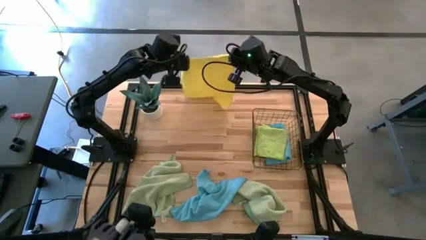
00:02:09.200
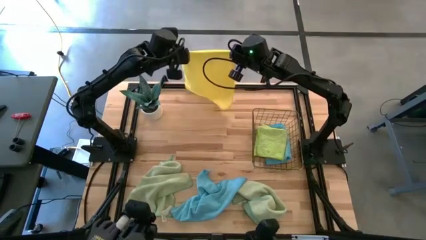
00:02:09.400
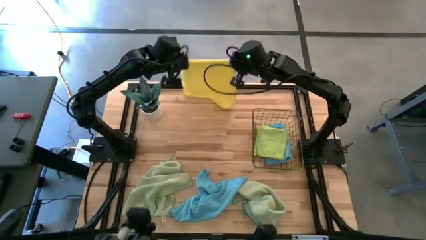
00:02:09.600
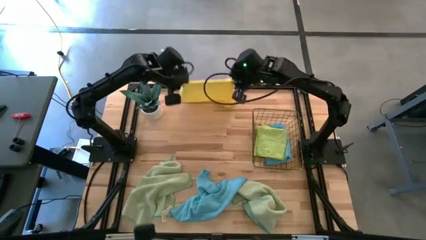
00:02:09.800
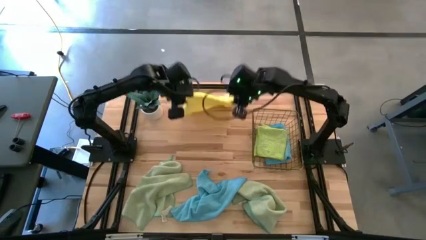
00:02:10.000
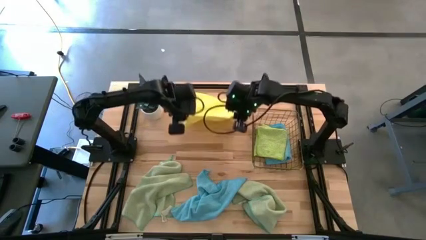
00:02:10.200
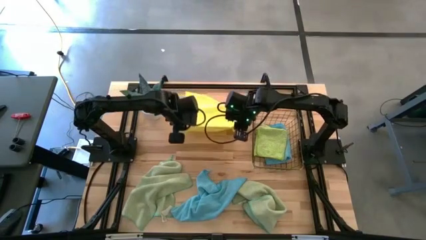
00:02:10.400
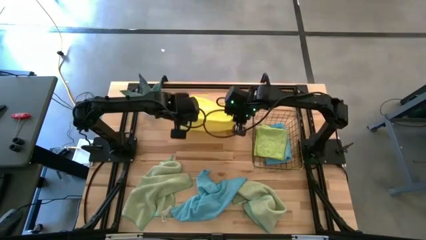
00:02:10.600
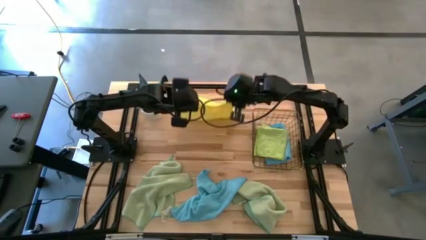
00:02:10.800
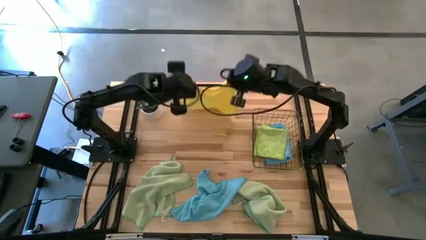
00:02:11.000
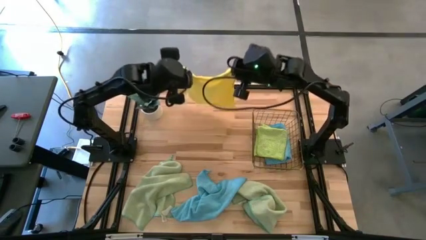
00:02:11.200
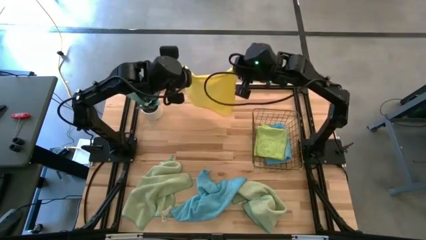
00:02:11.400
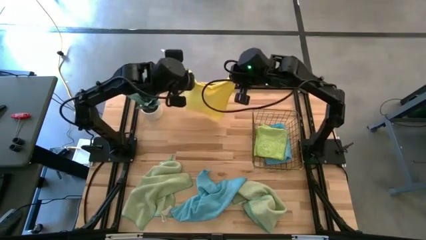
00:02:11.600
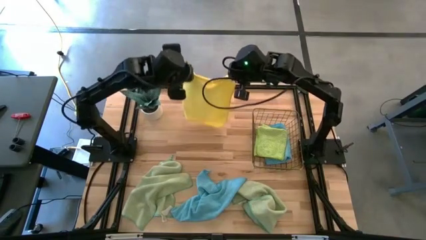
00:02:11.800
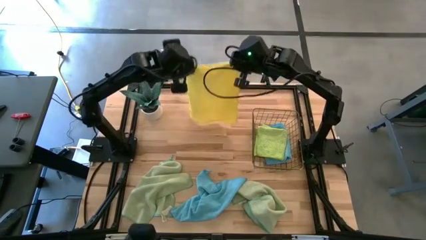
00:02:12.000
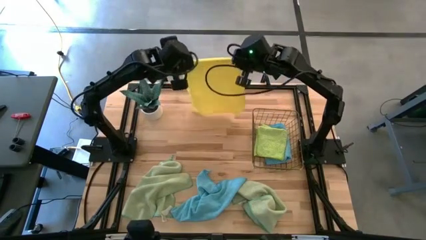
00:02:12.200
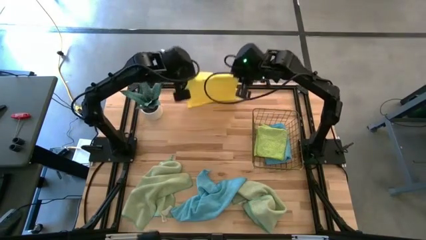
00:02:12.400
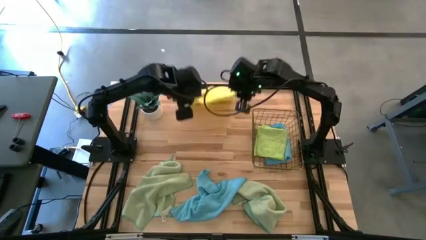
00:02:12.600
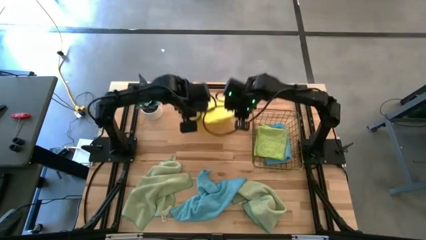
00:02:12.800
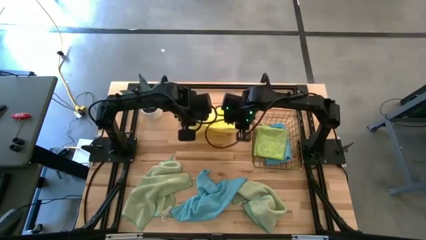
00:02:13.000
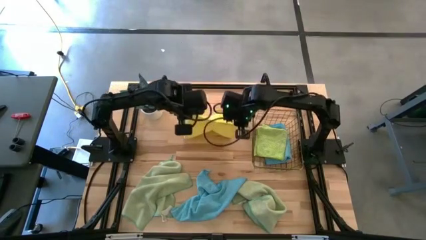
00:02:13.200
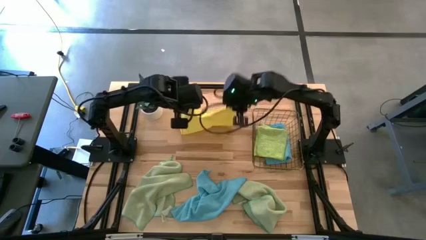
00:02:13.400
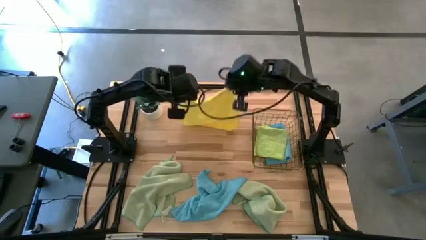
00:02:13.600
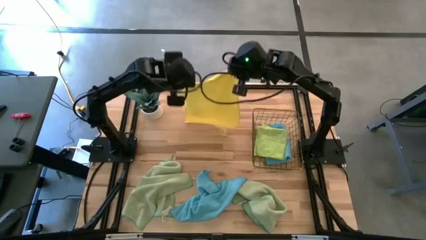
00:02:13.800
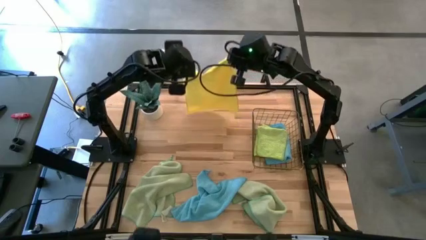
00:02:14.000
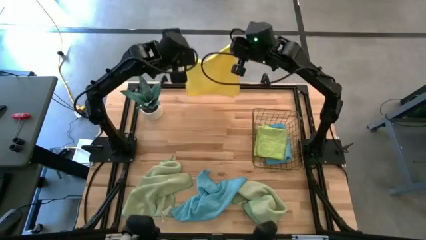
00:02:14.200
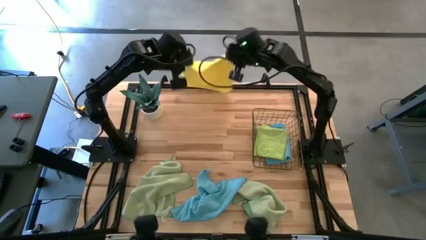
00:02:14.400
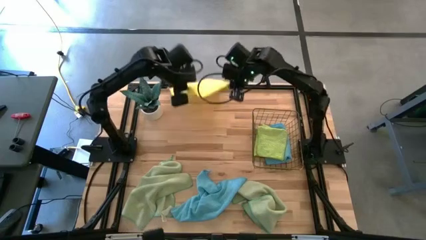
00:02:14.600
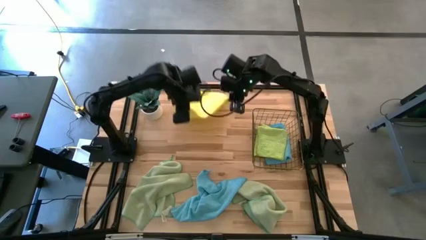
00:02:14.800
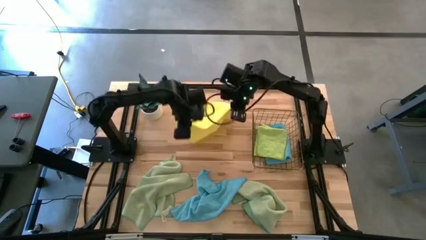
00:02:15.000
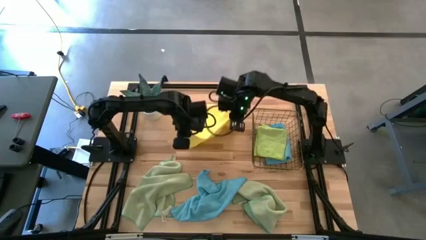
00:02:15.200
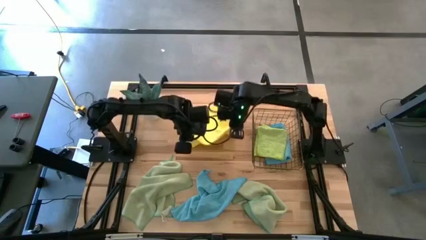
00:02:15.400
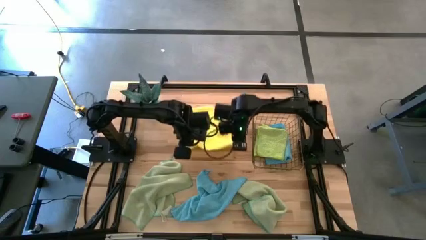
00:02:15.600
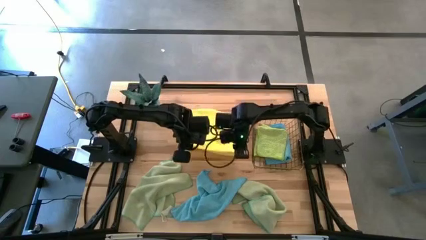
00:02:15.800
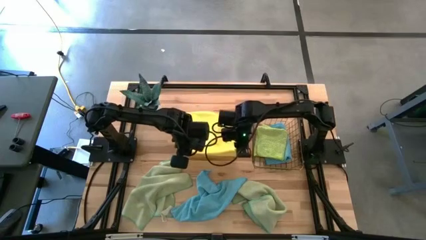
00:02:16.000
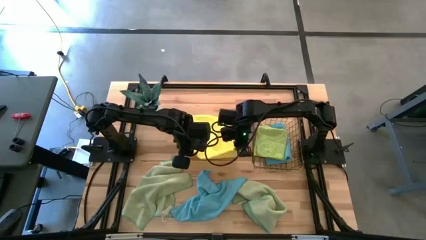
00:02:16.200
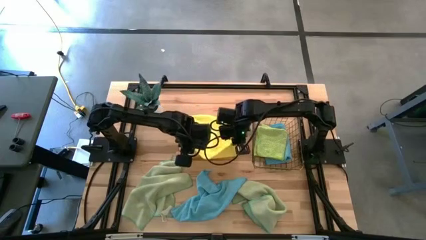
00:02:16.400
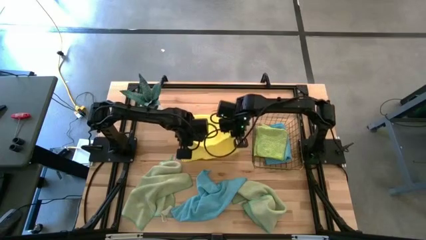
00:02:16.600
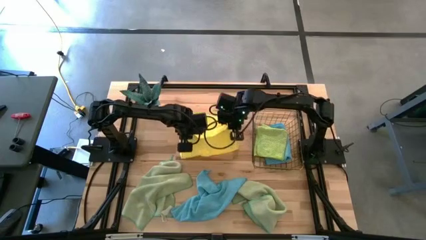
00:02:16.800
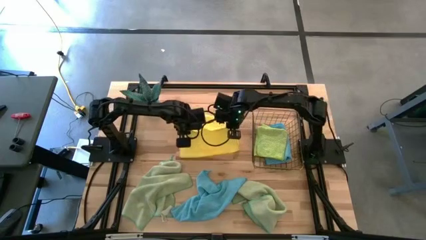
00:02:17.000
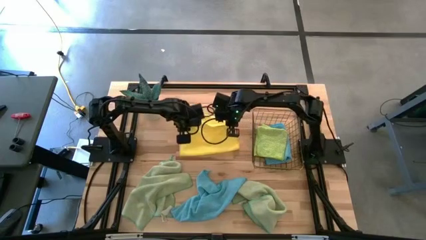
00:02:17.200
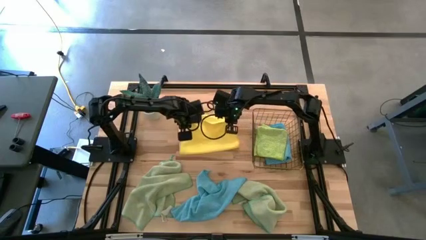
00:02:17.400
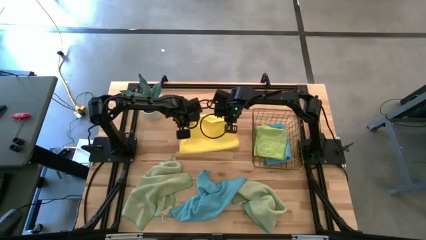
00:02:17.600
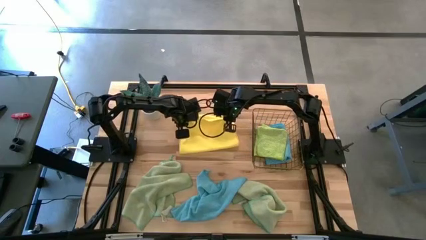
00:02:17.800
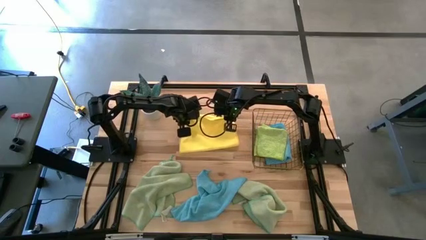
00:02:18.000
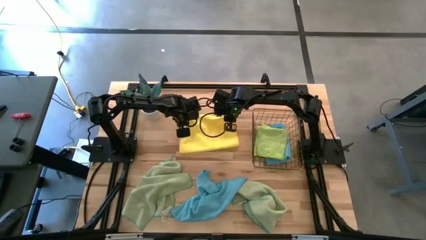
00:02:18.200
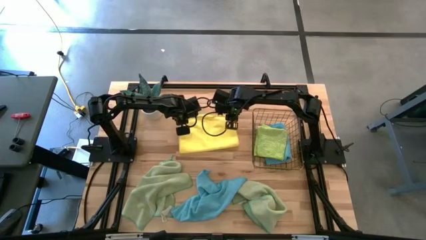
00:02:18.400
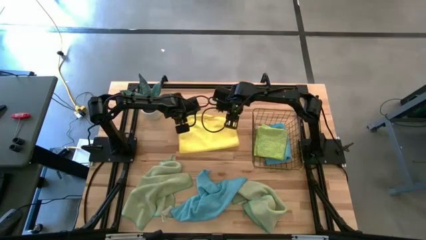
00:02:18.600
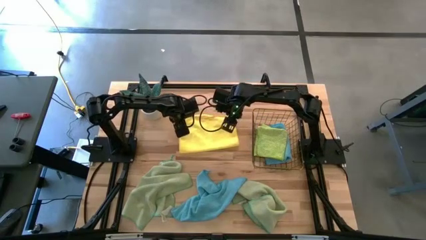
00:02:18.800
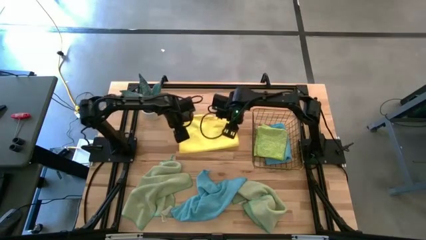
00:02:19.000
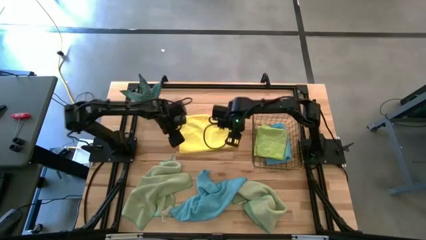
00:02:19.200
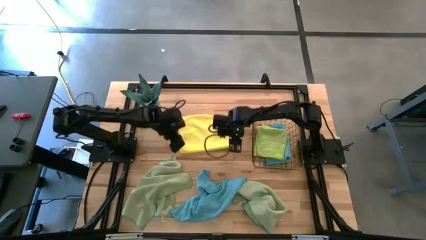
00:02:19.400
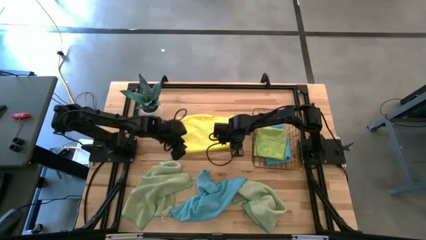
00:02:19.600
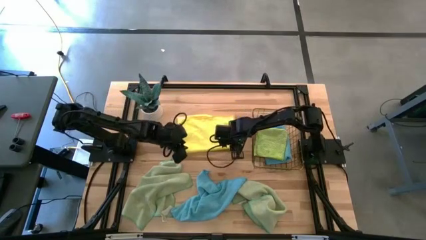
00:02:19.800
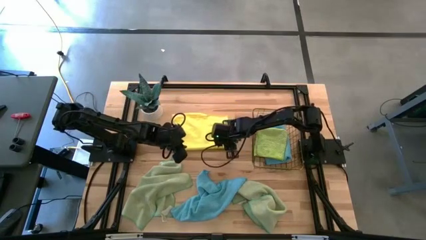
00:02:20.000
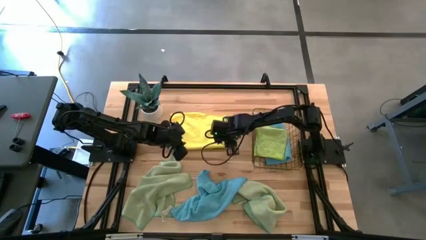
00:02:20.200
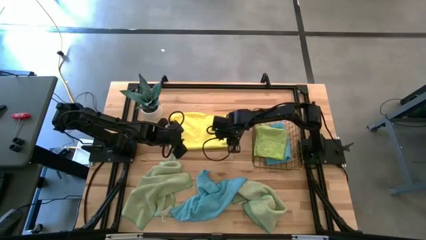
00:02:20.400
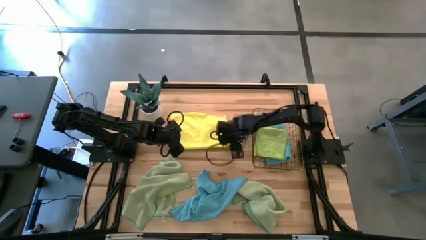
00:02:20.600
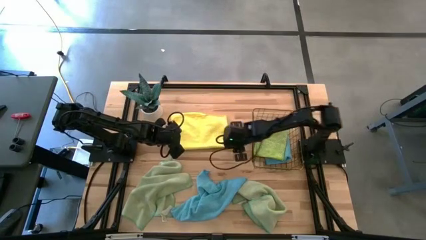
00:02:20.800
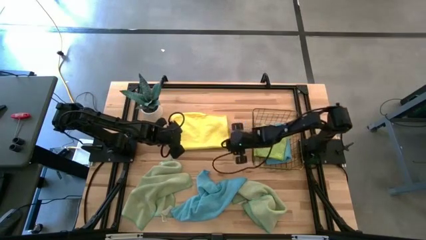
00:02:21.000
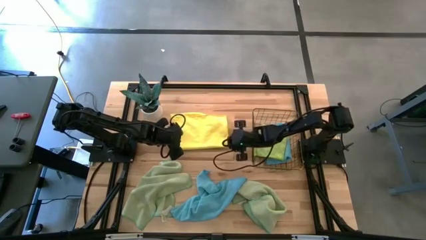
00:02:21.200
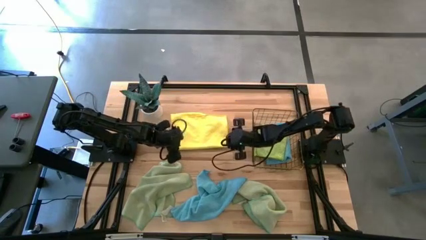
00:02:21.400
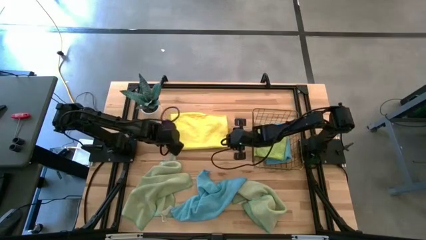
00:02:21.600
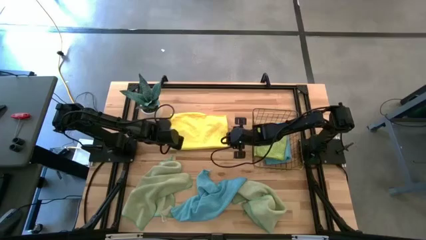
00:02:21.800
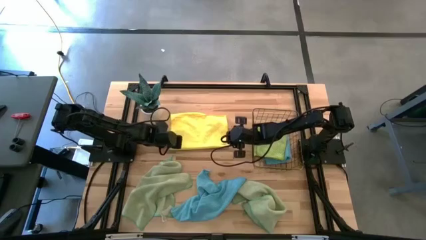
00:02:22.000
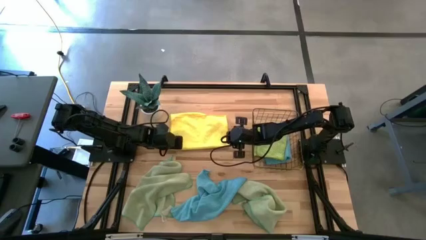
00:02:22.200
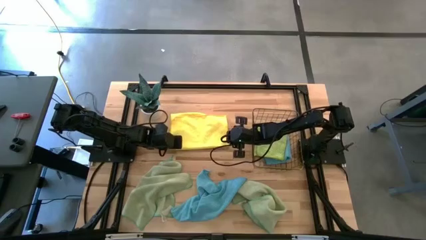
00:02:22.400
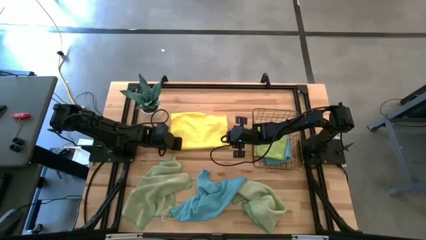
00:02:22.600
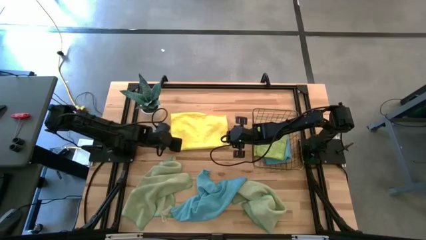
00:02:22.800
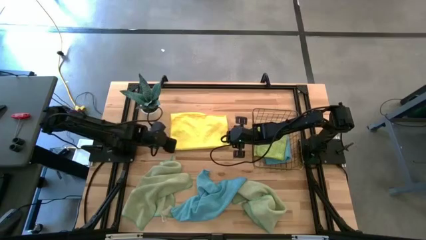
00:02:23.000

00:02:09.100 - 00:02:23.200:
Task: Fold microfiber towels
Fold the yellow microfiber cloth

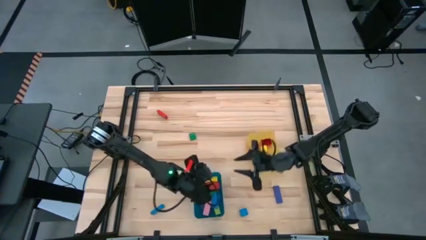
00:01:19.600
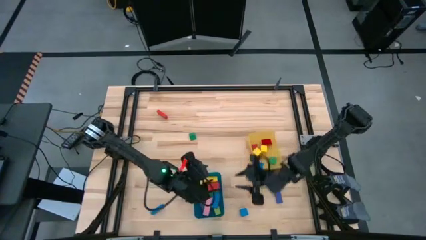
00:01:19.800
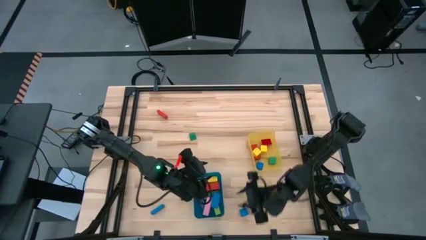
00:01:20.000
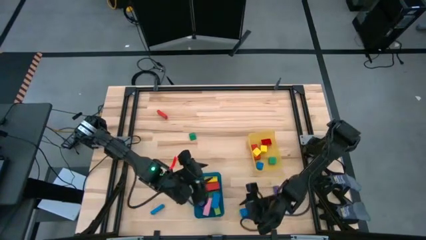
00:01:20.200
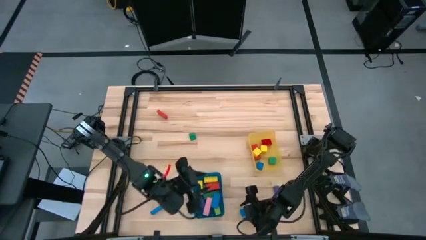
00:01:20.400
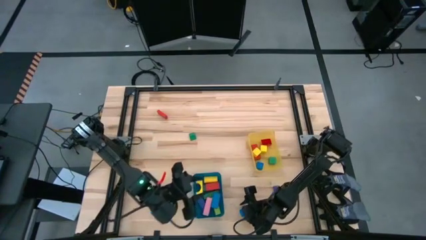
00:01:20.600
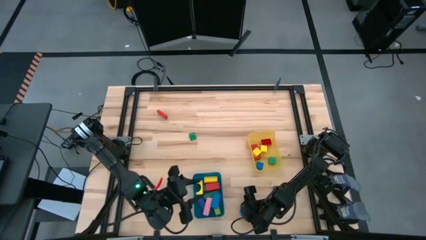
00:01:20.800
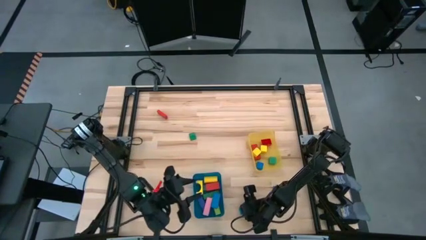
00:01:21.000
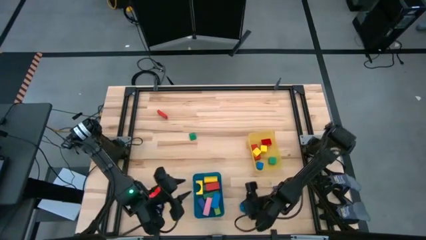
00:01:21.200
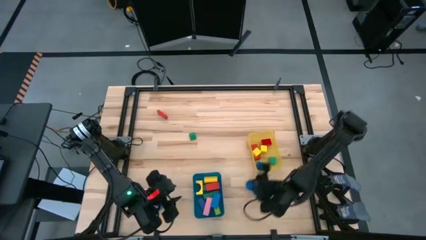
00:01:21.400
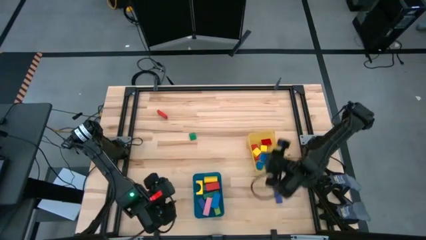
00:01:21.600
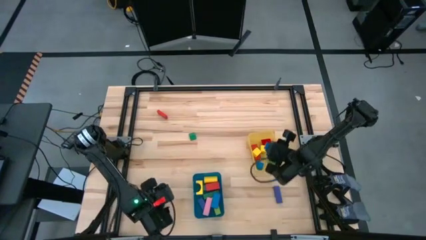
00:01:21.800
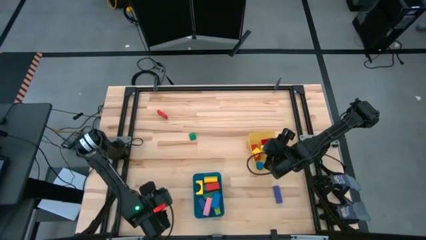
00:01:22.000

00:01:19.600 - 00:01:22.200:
Task: Sort blocks by size
Put the small blue block into the yellow bin

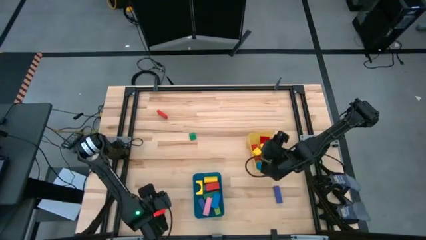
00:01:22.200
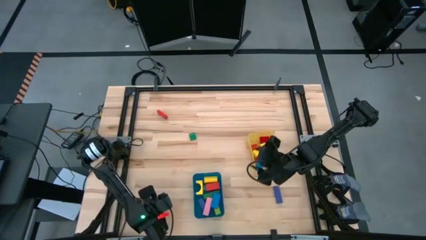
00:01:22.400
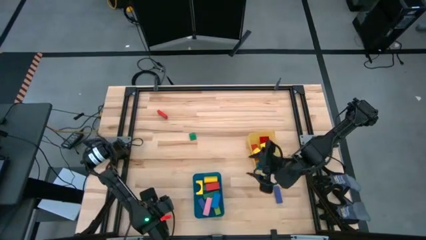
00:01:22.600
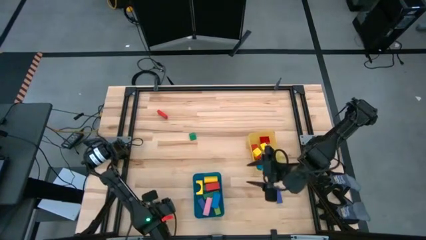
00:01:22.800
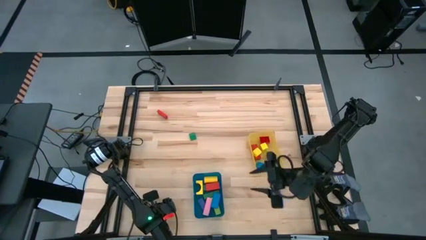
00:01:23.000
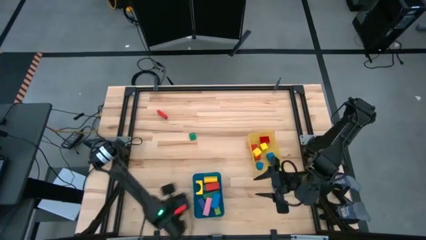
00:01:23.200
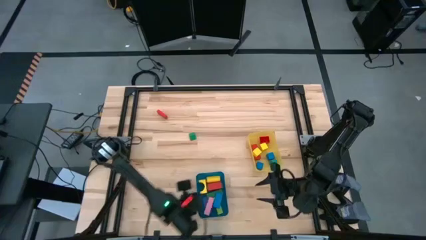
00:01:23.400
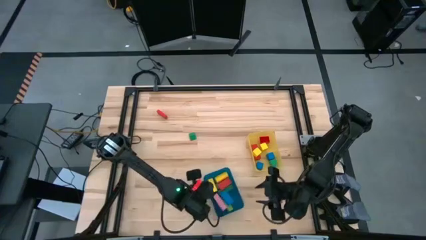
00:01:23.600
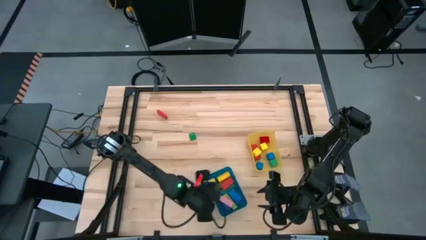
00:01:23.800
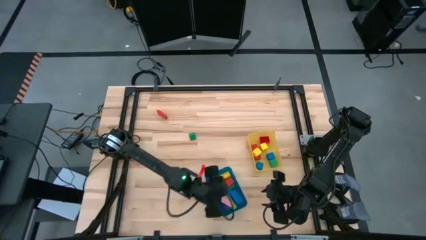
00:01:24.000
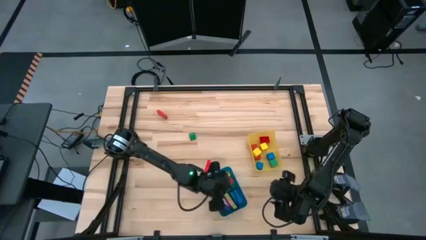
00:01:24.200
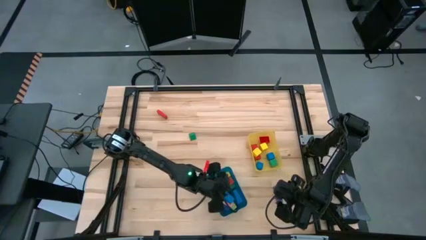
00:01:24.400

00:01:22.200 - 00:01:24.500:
Put the large blue block into the blue bin
